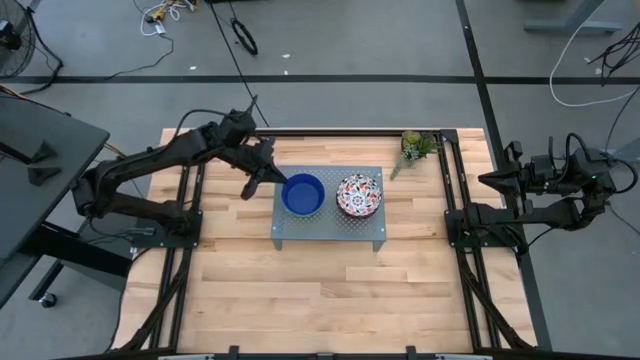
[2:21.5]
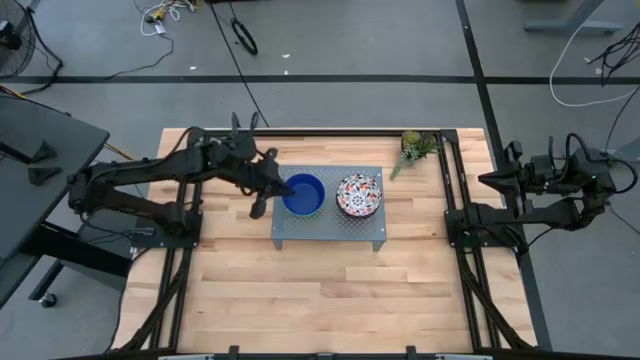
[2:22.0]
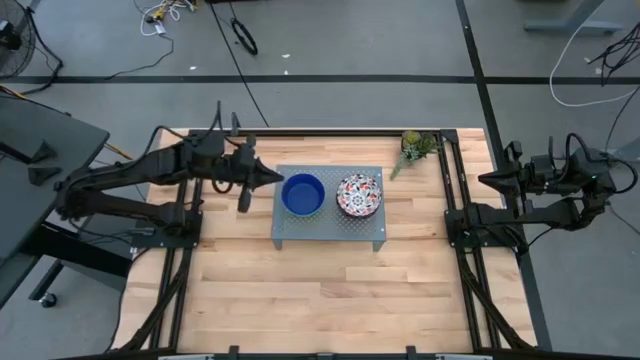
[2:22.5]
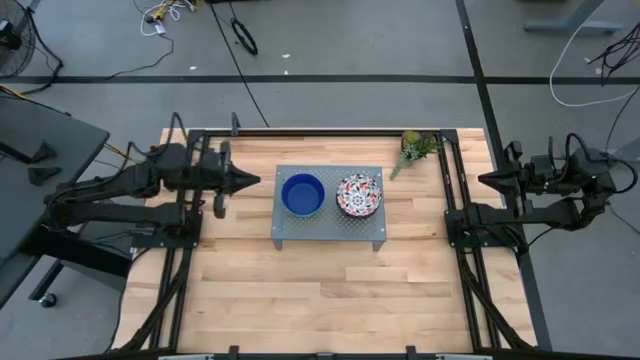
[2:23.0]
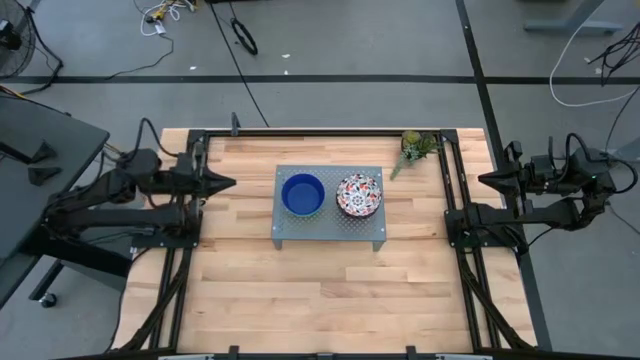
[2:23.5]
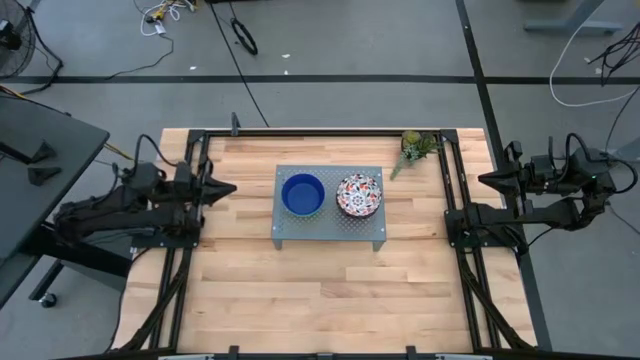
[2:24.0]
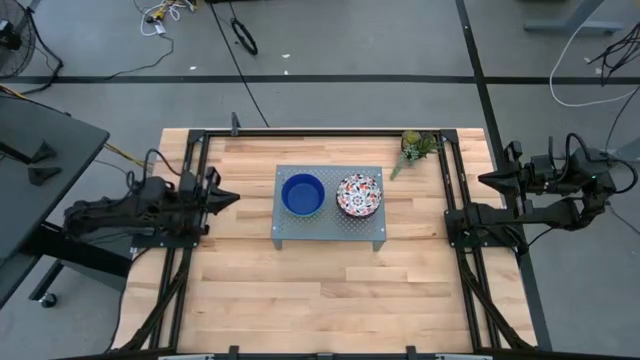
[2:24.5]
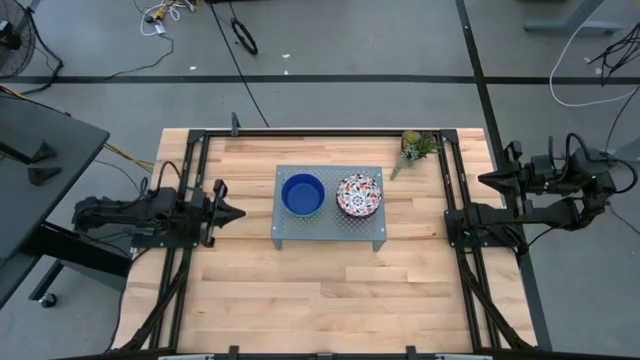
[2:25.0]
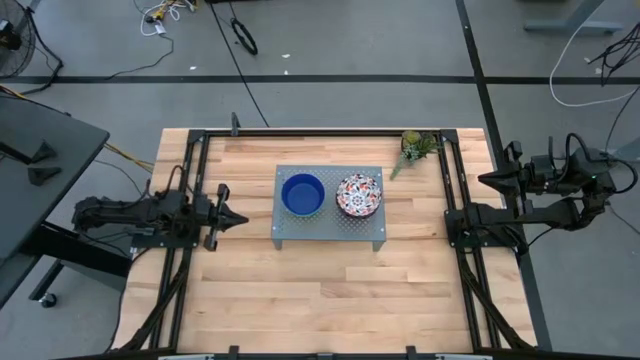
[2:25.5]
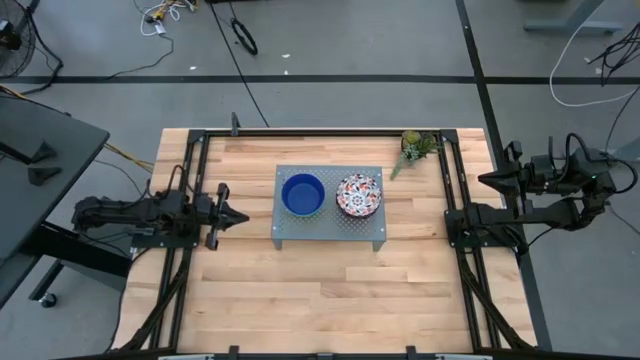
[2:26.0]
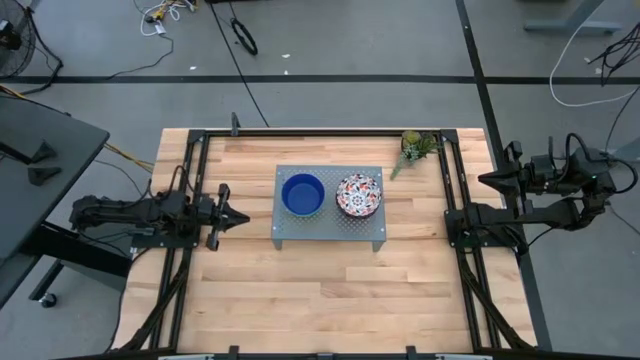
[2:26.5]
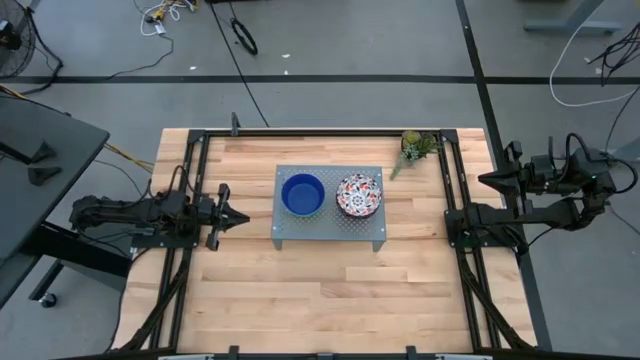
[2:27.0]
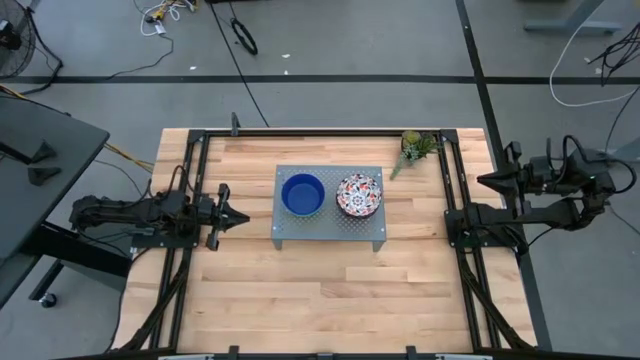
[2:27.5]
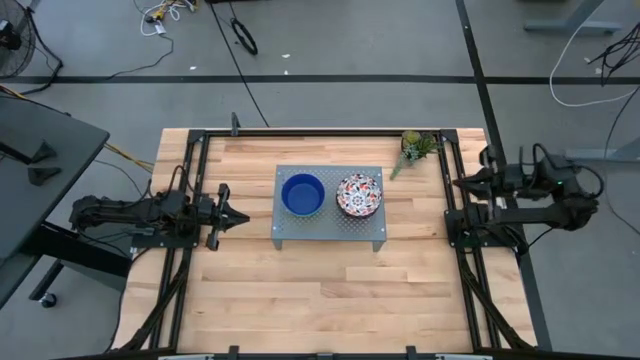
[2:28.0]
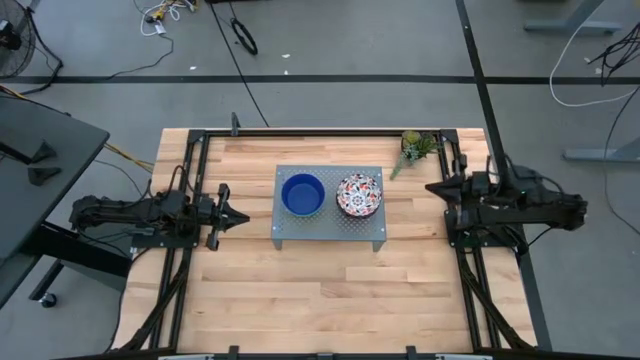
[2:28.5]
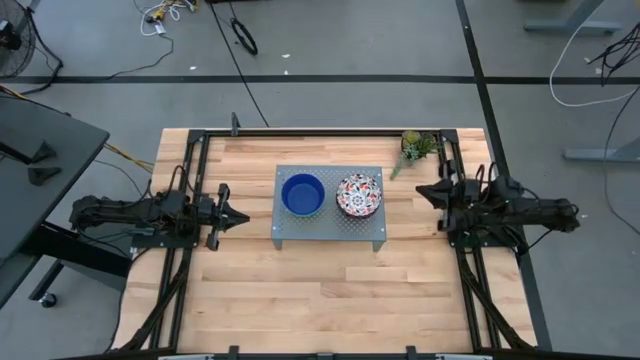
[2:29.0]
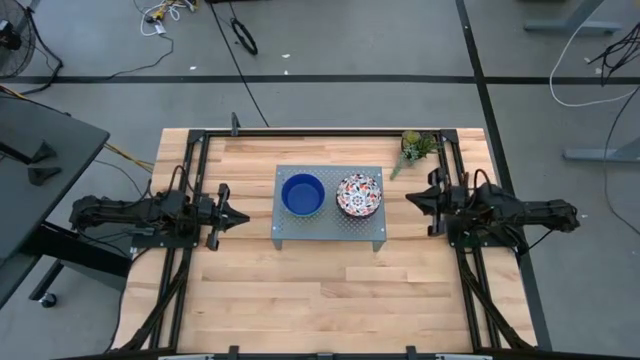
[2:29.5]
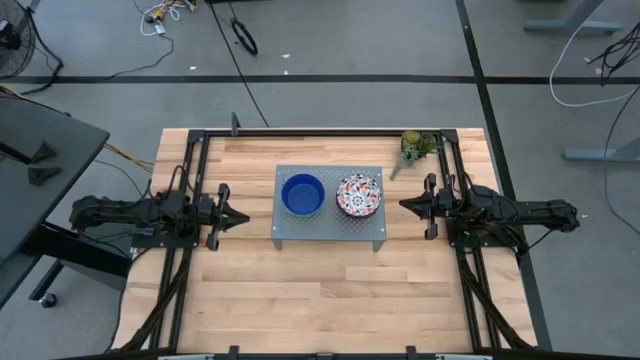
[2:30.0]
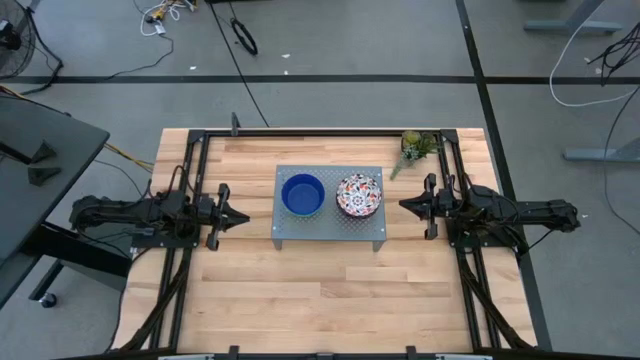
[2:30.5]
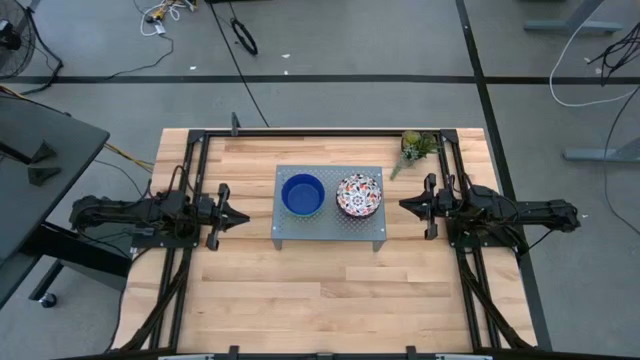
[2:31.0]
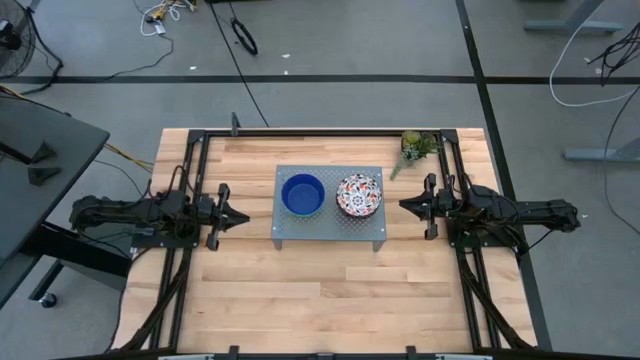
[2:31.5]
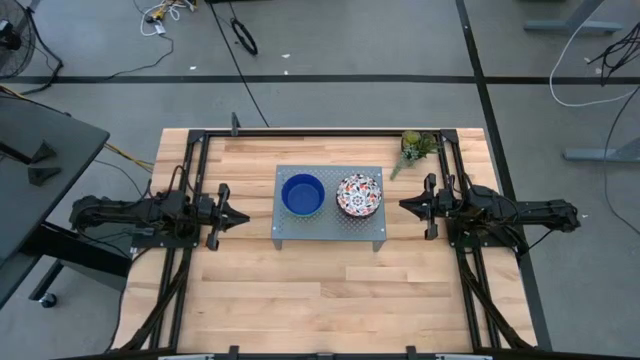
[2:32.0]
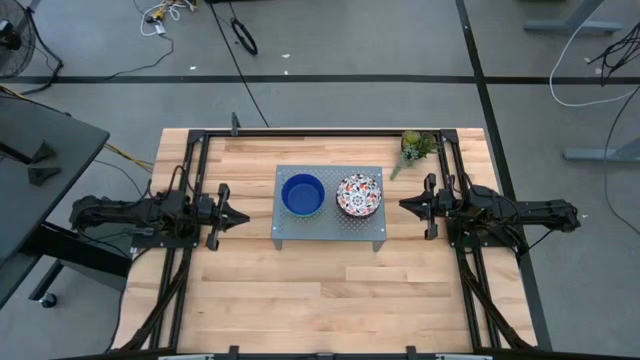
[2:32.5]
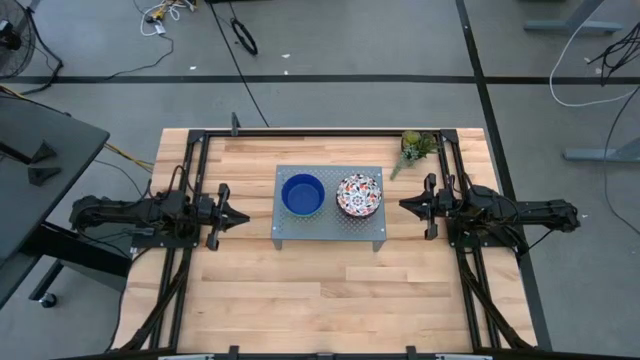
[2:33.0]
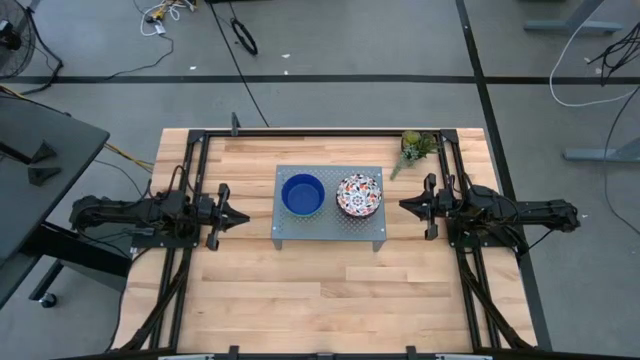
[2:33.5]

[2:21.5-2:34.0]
Task: Pick & Place Mini bowls
Return to Home Position

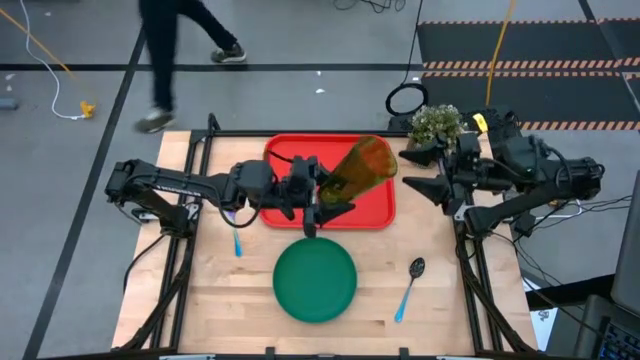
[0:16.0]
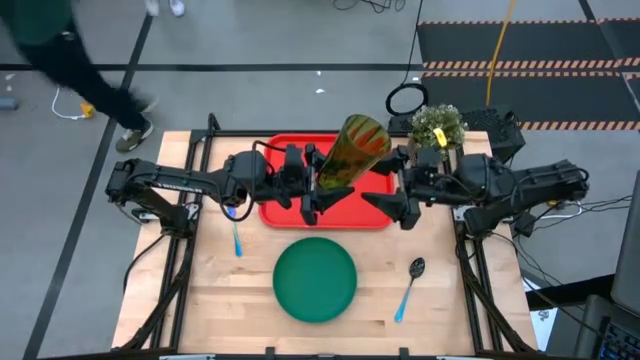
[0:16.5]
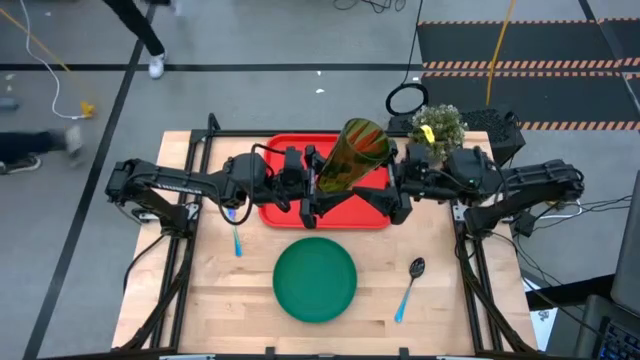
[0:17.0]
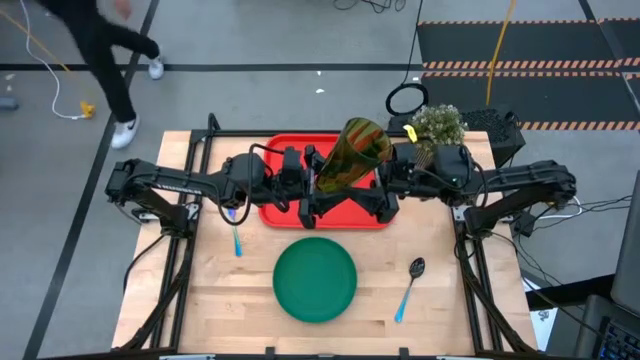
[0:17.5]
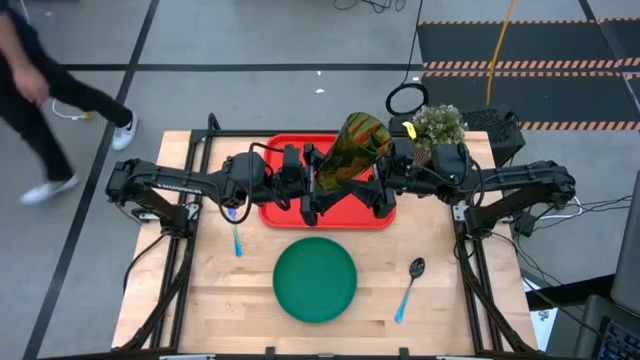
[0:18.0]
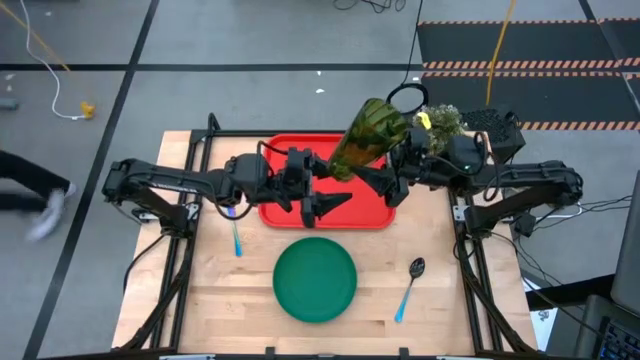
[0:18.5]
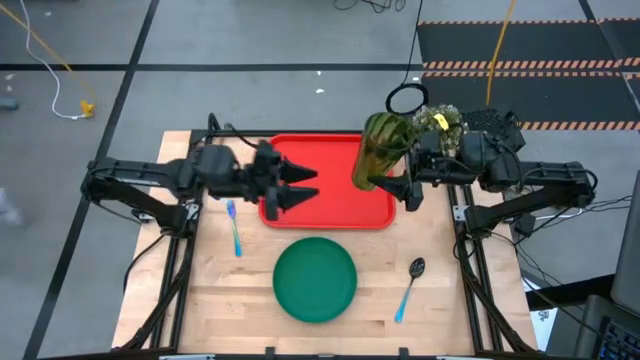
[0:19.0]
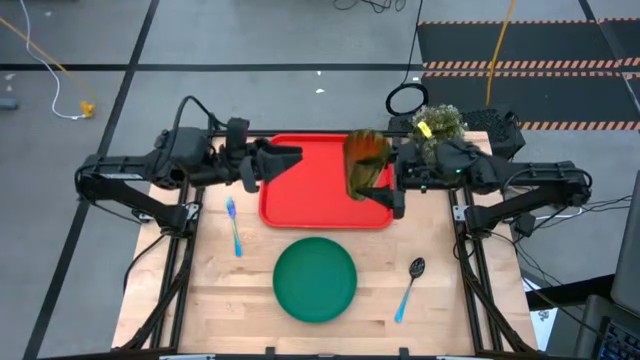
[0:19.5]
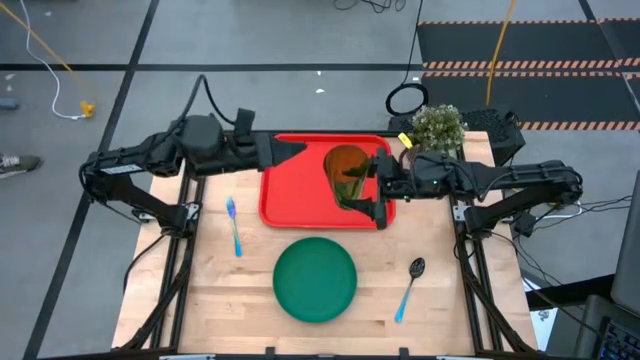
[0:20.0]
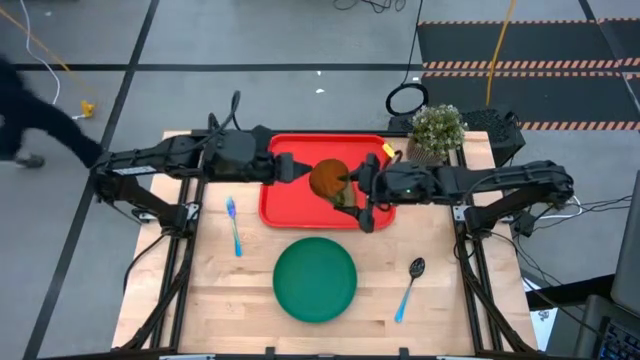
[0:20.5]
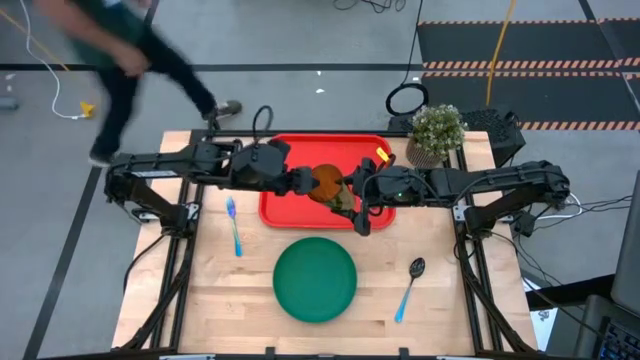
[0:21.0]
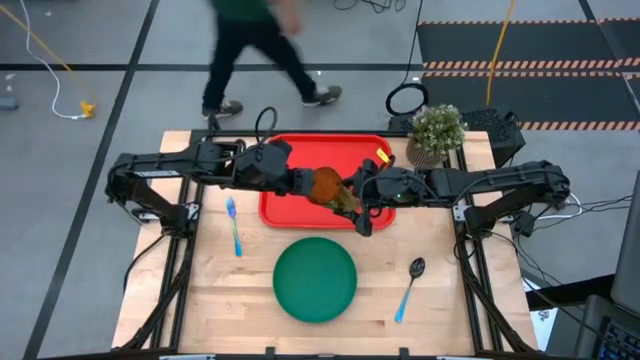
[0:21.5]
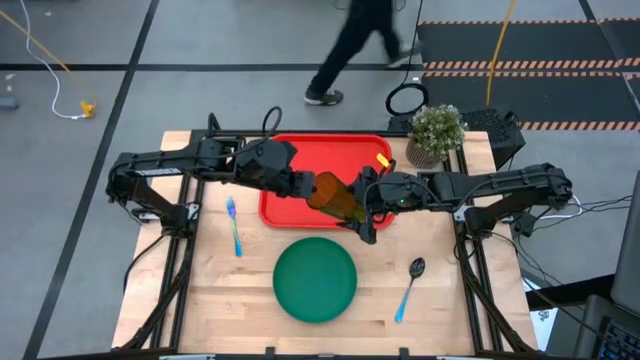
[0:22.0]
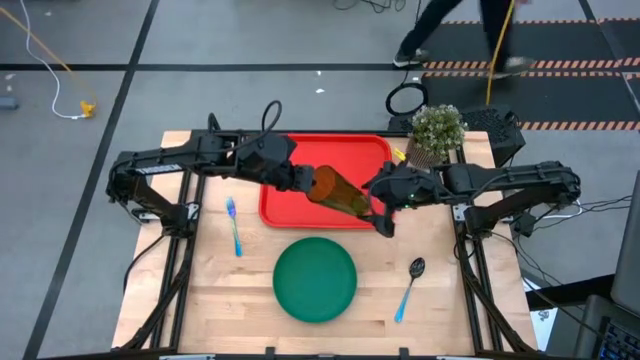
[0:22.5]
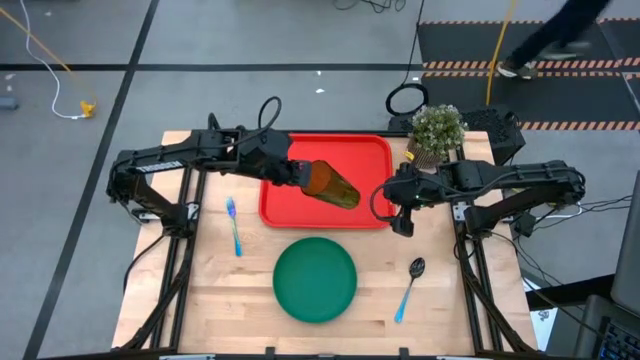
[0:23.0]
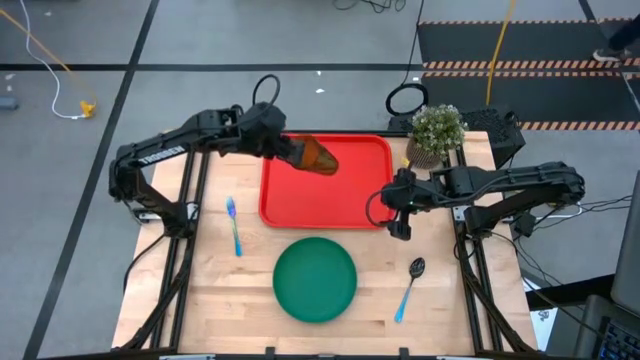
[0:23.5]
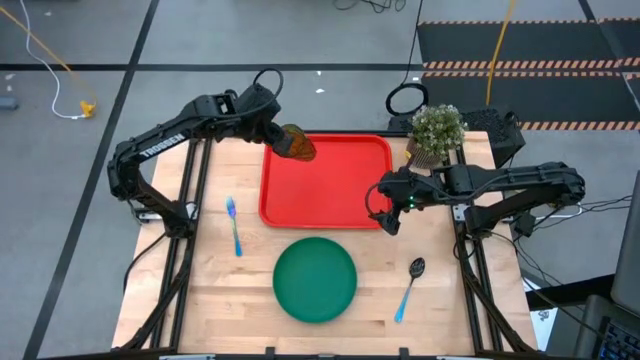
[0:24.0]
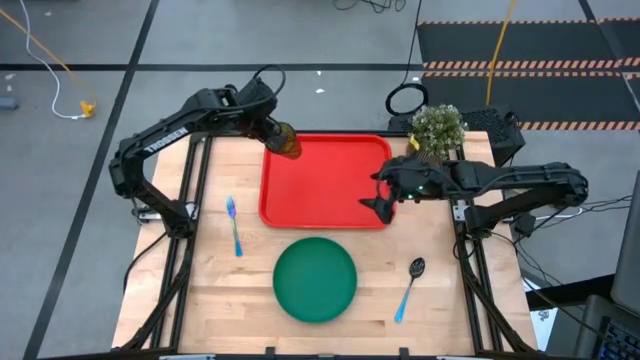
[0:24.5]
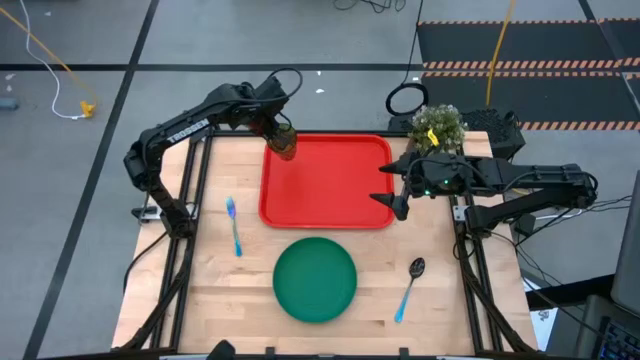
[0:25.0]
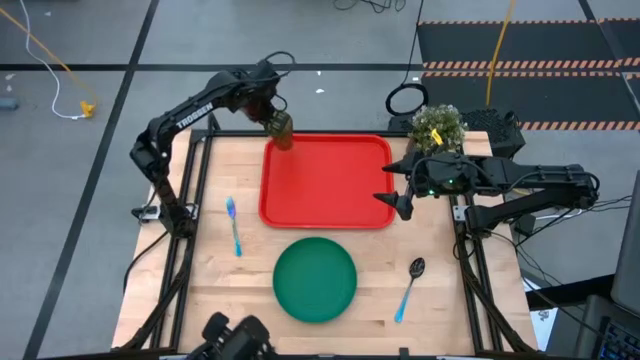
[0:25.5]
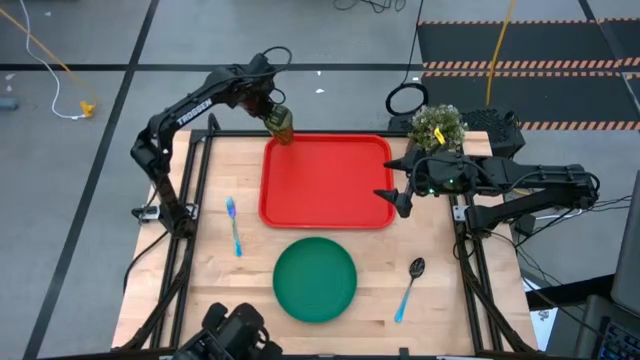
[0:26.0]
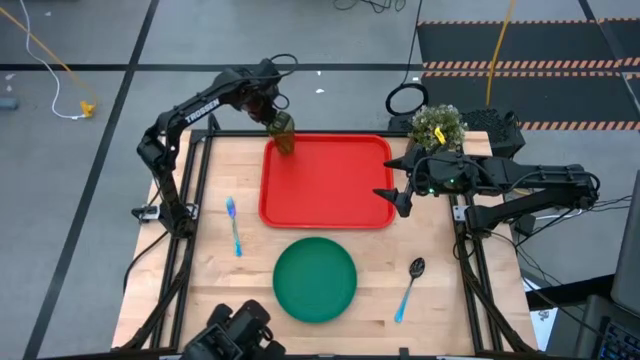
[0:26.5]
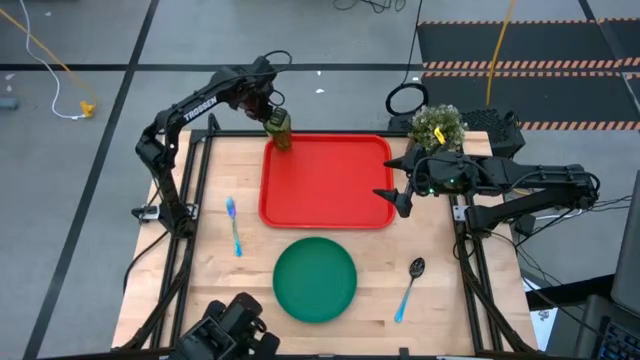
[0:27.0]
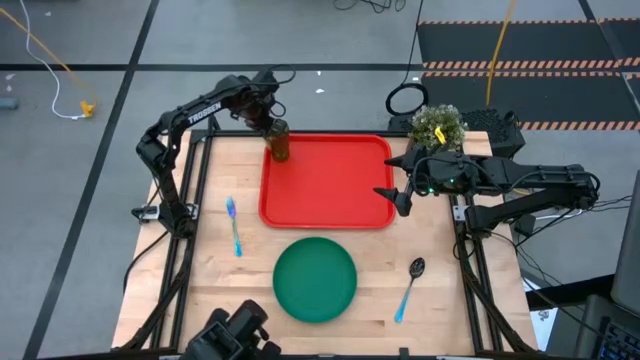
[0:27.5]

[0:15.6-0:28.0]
Task: Pick and place plate/cup/fork/spoon on tray
Put the green glass on the orange serving tray
